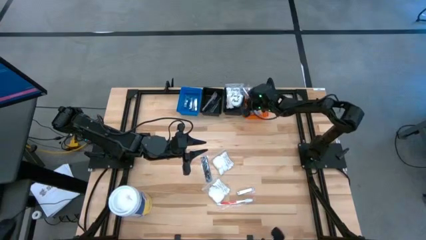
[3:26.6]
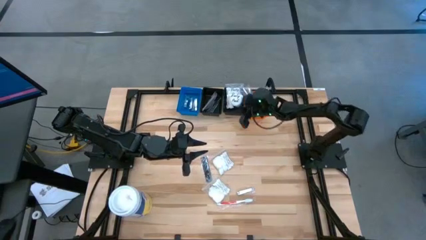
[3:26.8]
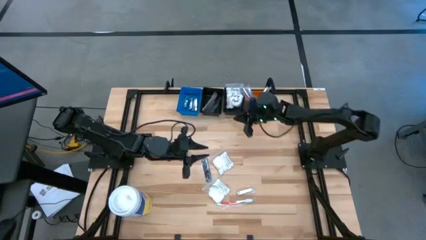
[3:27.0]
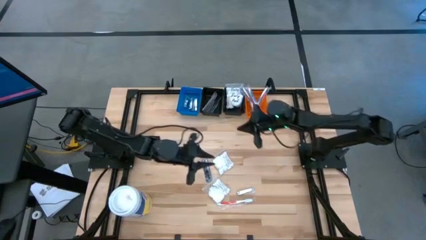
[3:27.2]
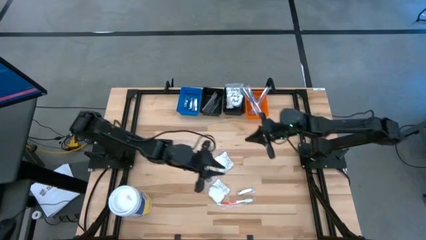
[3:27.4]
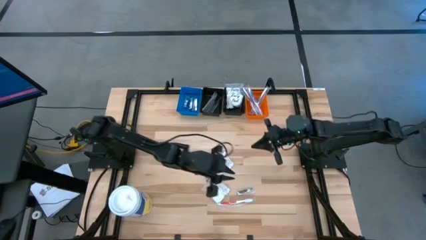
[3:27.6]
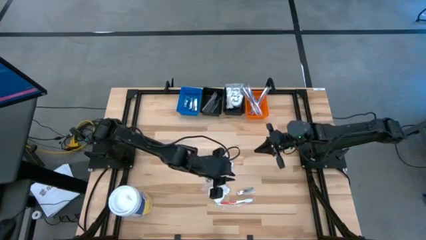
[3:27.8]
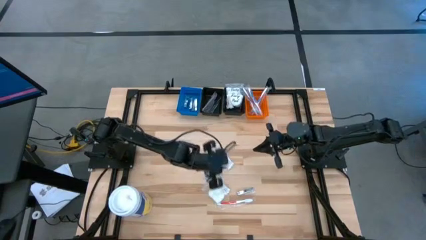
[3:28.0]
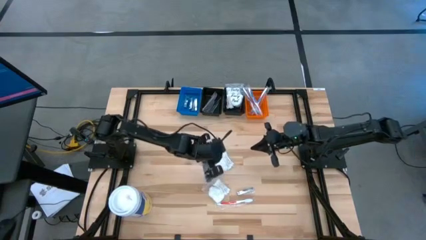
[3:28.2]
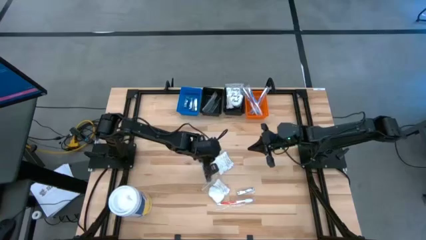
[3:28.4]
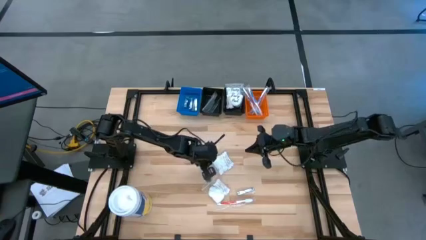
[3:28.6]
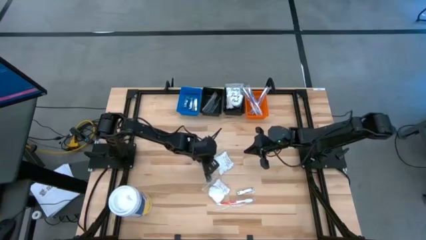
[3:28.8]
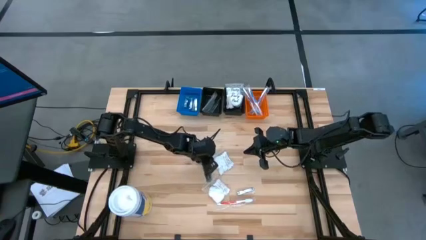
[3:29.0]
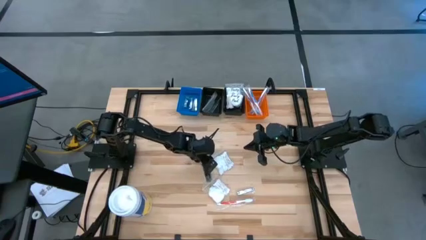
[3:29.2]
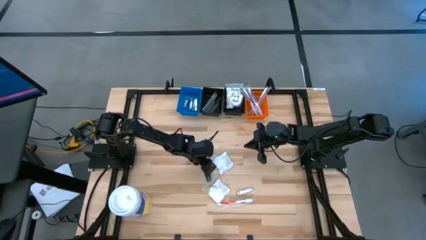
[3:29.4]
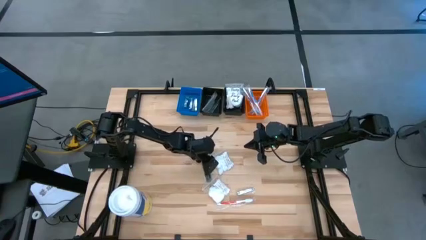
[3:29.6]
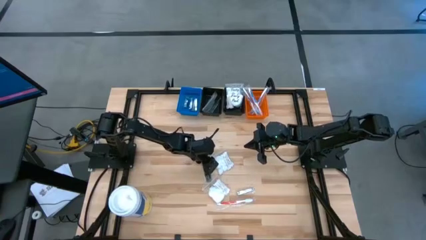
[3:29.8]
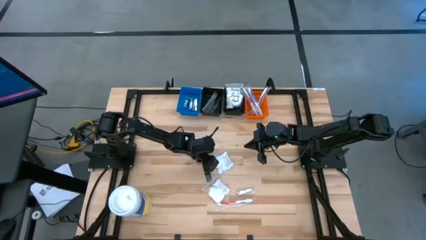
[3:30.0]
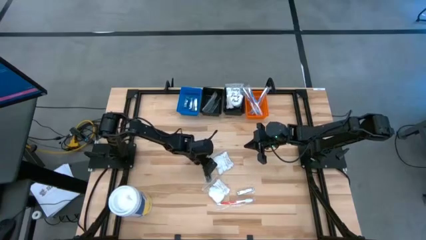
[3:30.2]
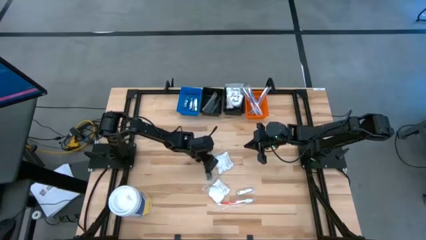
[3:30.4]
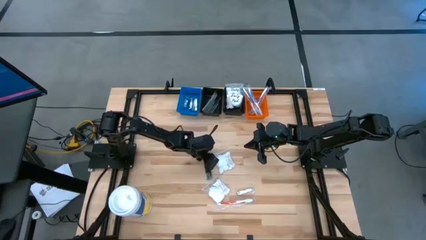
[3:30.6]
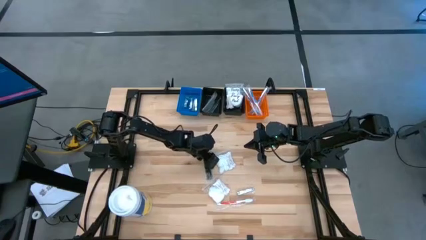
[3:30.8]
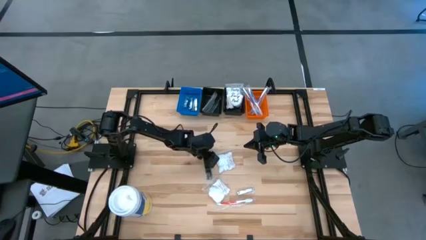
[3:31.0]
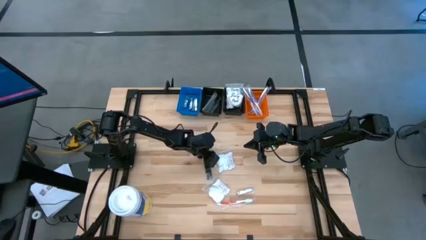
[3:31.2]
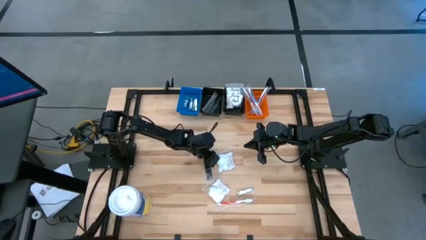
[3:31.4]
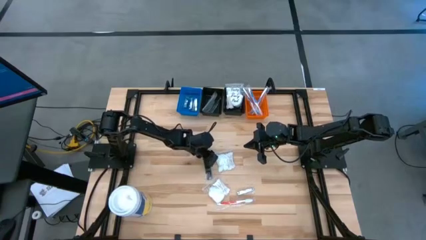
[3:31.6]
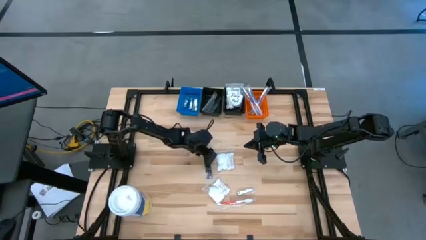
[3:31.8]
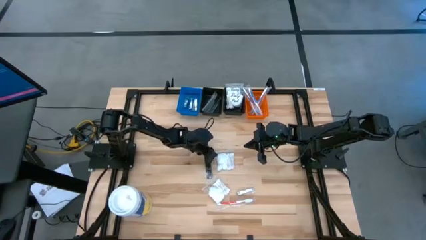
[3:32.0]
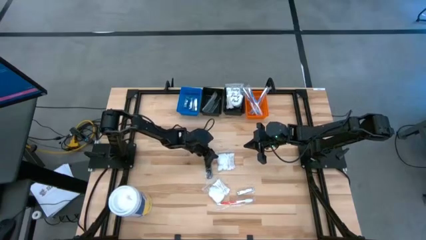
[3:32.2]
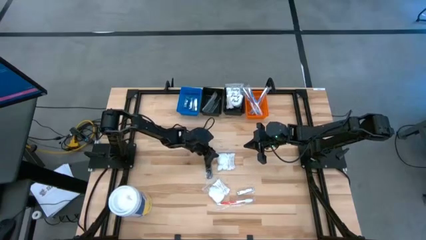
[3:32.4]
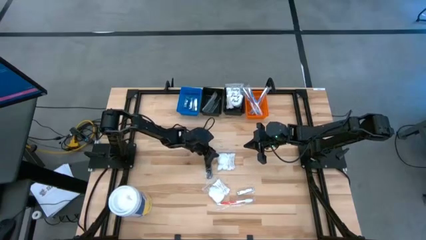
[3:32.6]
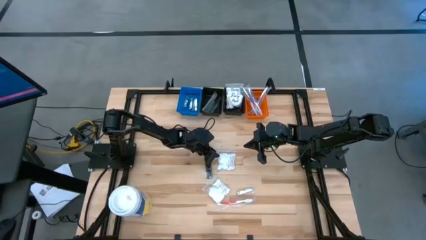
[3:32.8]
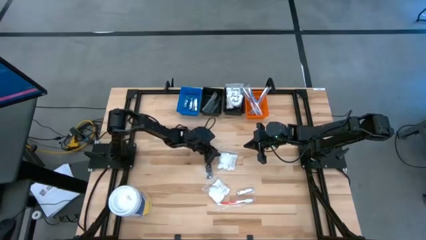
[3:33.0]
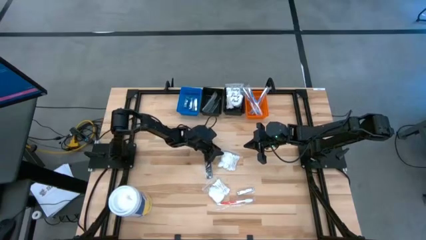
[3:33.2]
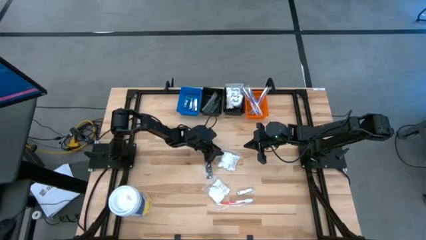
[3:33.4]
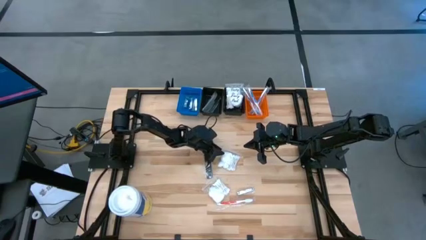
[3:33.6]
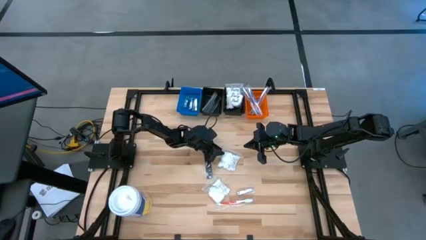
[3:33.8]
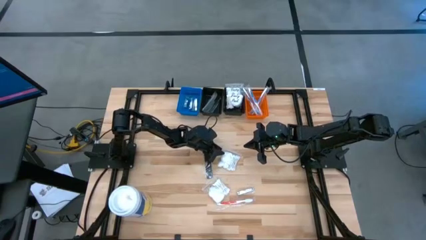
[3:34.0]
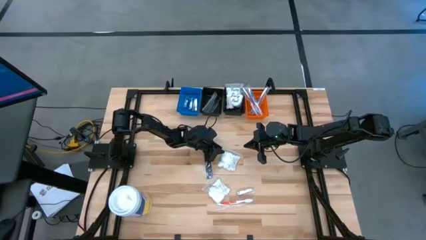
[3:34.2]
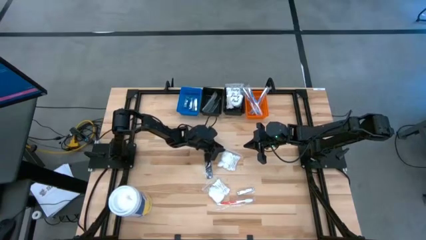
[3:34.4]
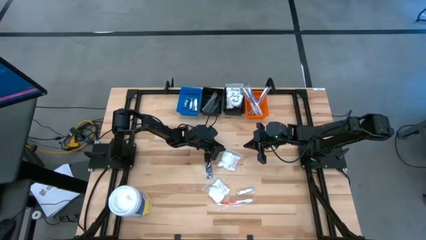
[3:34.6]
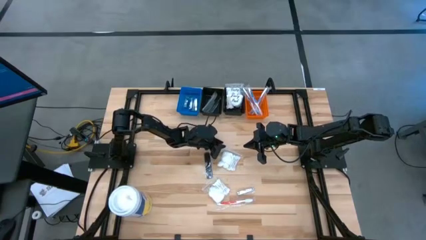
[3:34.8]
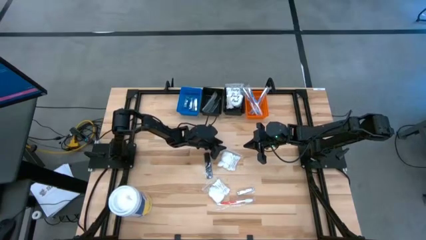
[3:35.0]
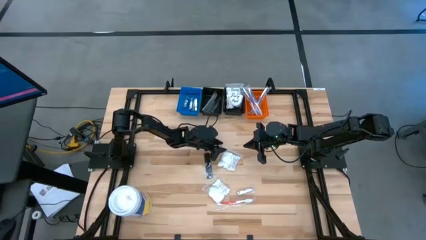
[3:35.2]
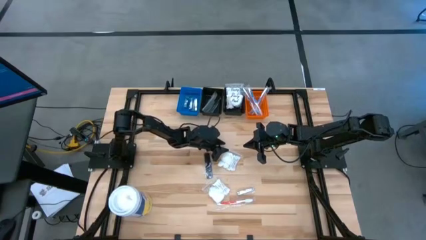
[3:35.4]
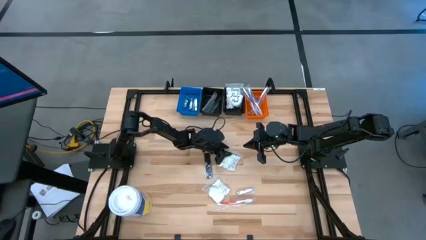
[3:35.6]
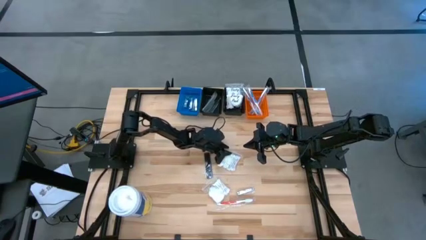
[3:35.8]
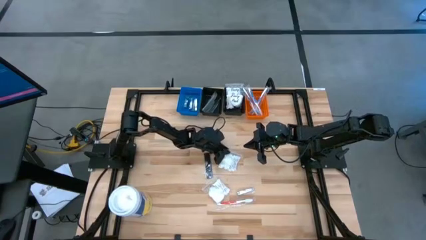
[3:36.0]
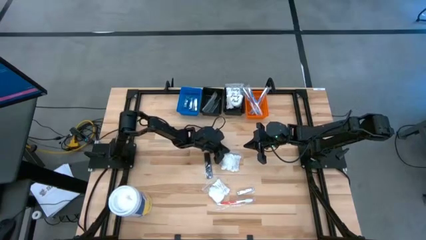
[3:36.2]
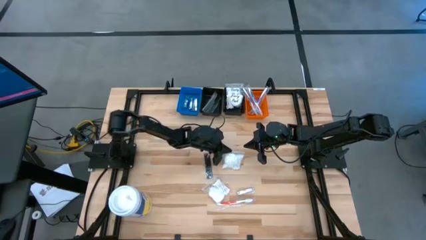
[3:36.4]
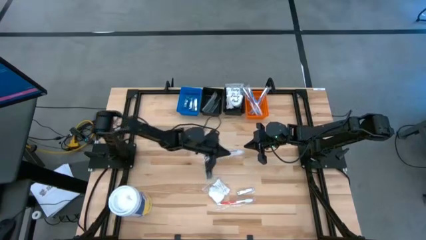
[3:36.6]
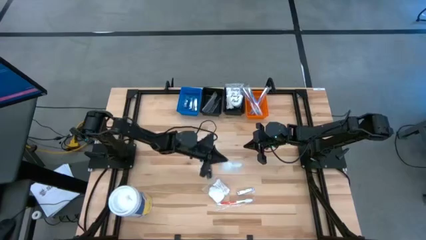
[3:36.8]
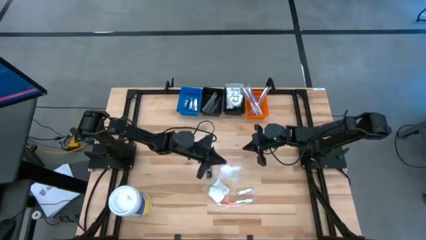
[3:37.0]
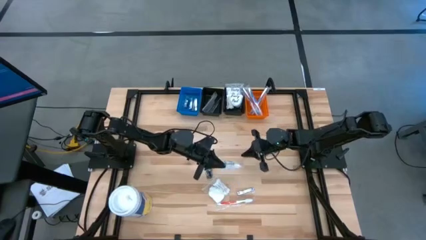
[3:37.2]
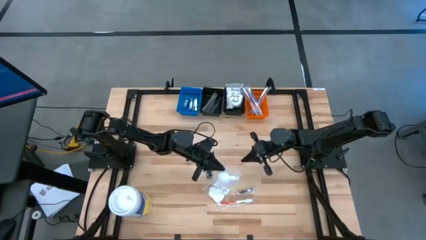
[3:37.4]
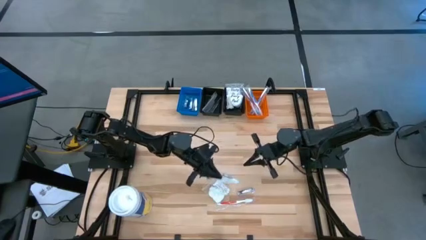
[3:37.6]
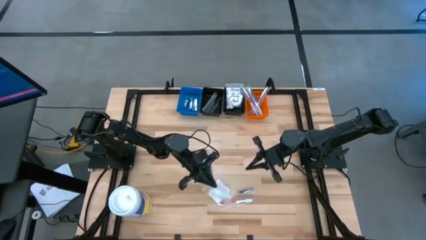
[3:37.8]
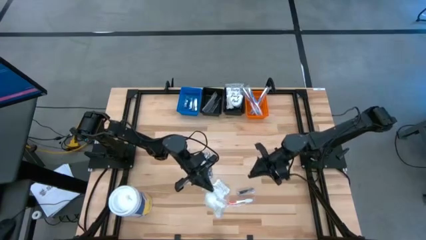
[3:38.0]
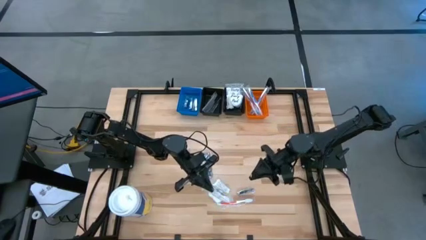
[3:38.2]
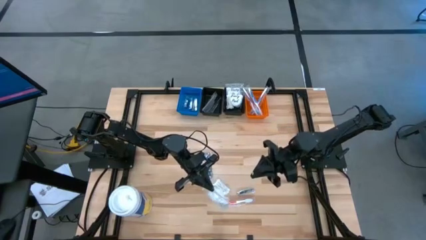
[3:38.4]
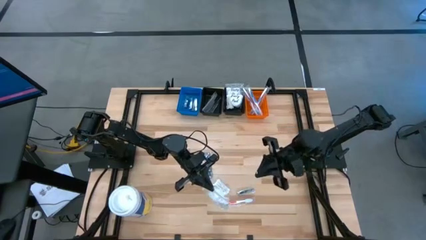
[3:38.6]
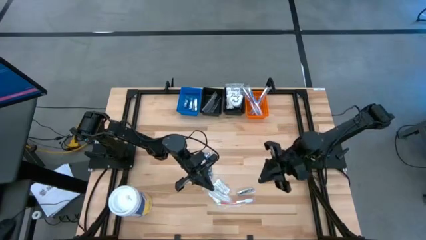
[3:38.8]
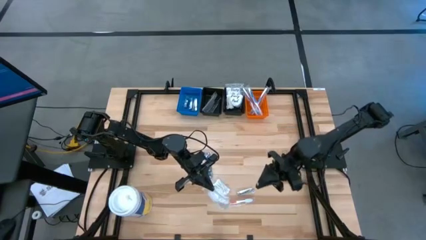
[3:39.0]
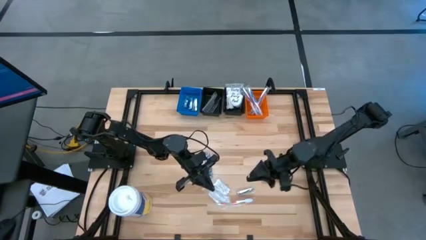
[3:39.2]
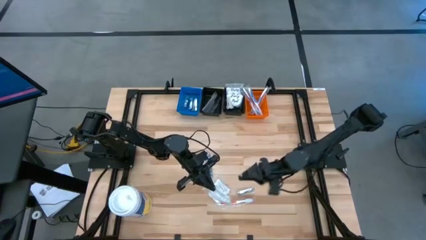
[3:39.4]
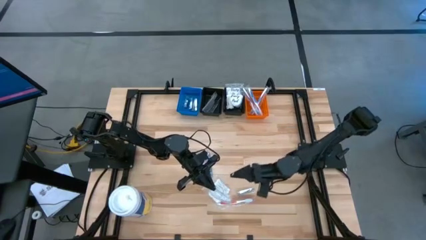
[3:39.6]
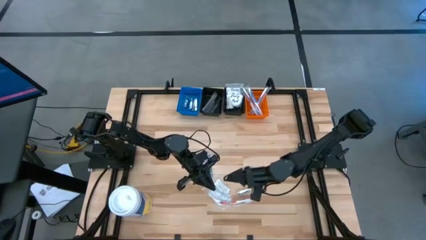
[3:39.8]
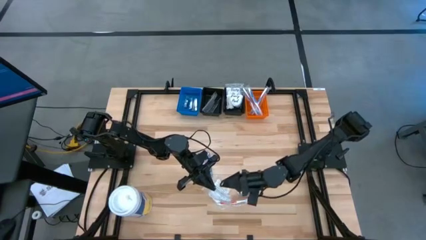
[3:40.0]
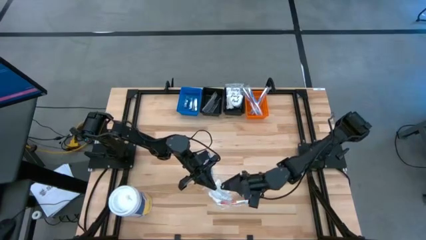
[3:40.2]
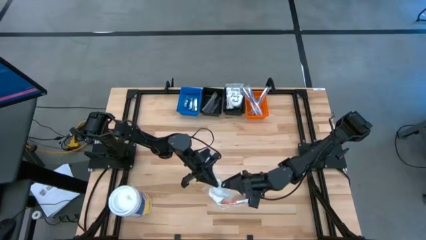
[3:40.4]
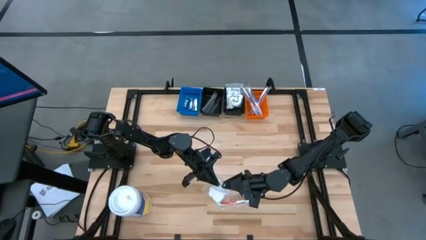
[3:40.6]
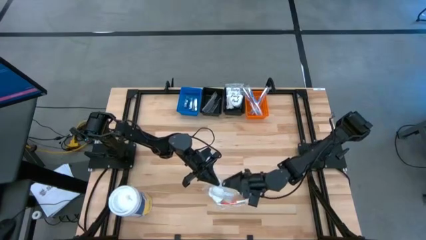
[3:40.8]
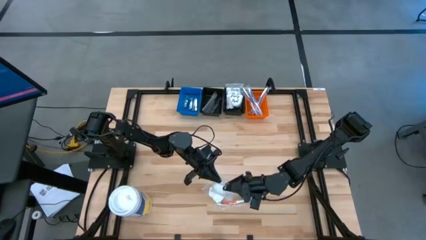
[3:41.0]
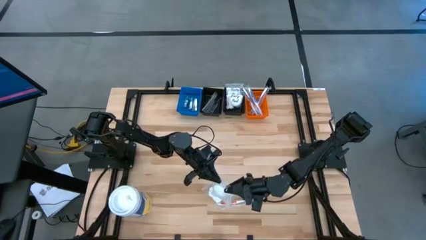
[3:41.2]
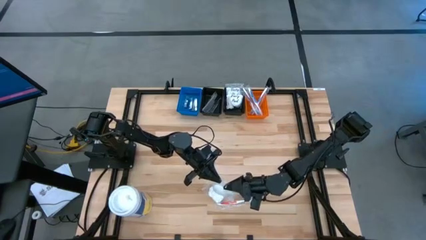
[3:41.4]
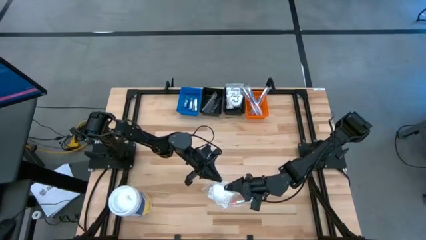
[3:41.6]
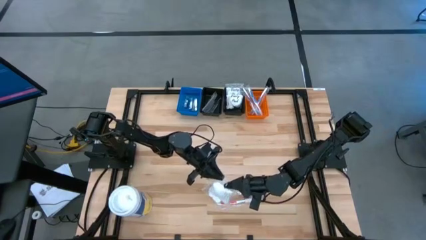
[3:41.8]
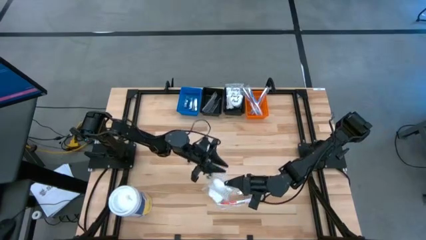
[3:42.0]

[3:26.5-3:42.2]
Task: Pick & Place Travel size toiletries
Put the white vanity pack into the right black bin

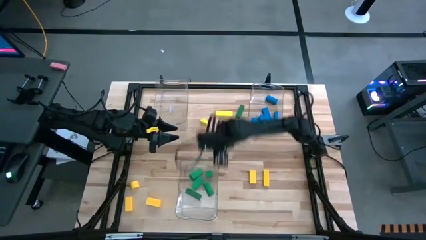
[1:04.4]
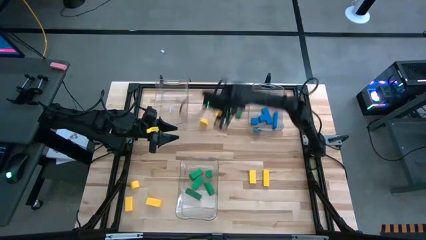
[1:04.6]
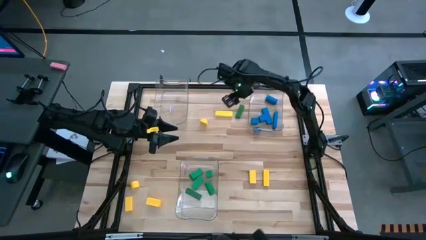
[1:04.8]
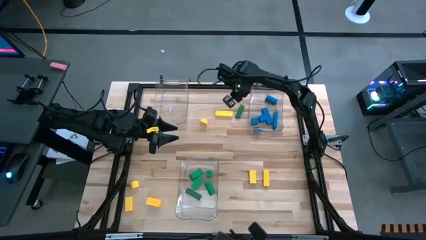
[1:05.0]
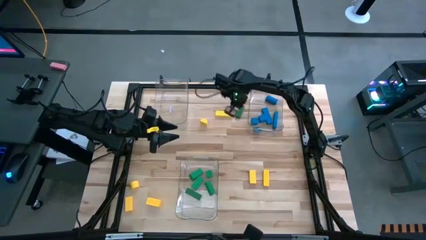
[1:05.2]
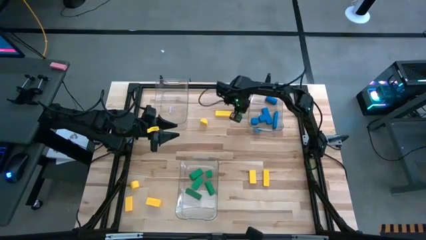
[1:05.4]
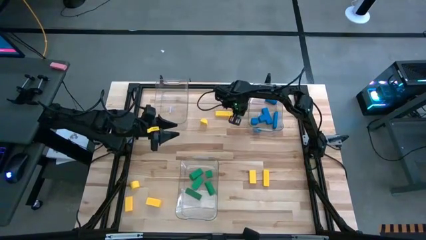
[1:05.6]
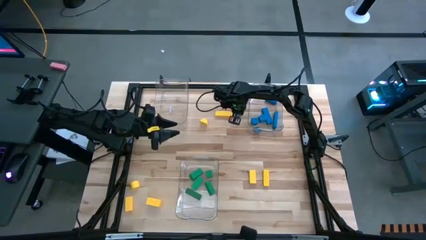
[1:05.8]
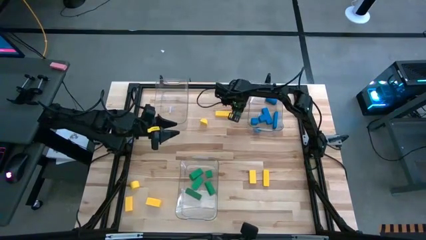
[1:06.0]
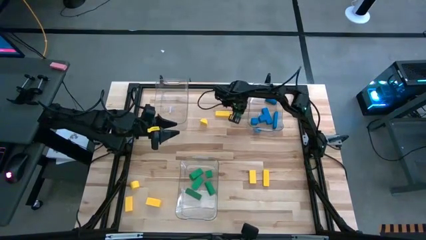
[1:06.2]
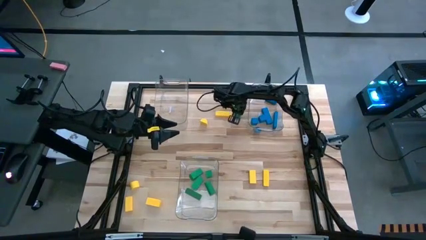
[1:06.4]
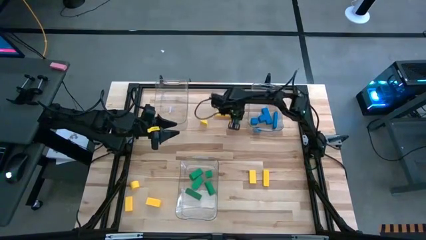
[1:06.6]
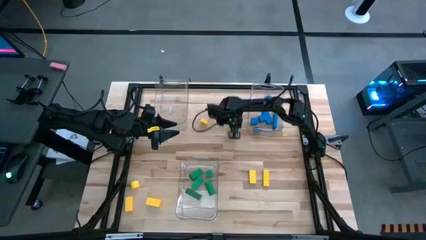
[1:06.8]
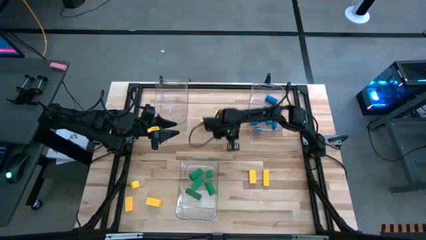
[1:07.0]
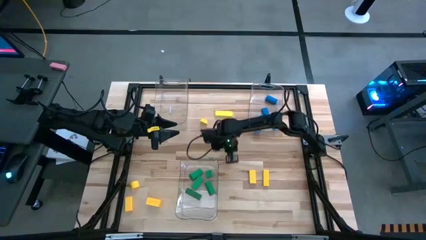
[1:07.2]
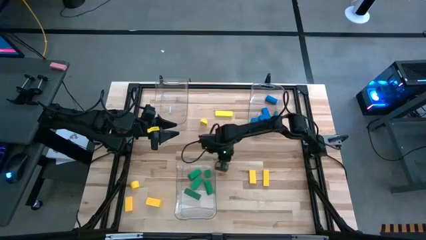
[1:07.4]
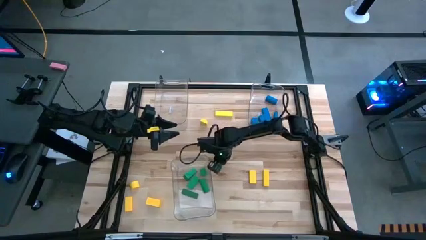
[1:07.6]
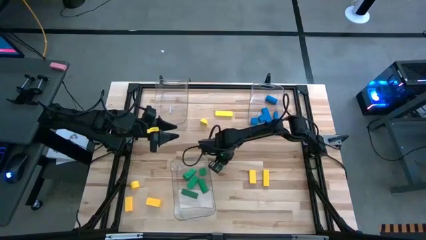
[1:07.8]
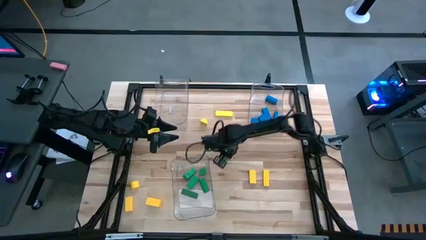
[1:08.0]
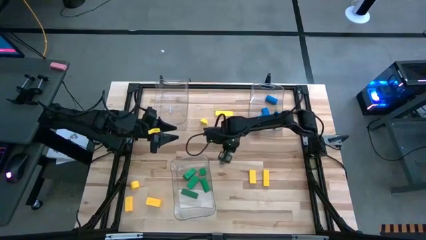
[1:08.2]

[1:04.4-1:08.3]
Task: Sort blocks
Move the green block to the center of the table
